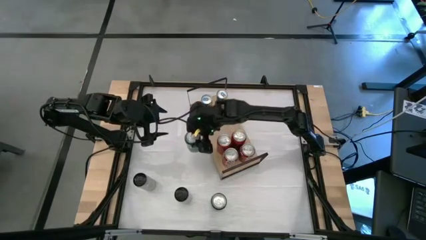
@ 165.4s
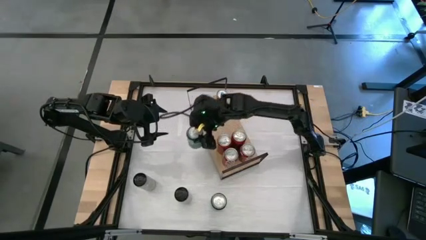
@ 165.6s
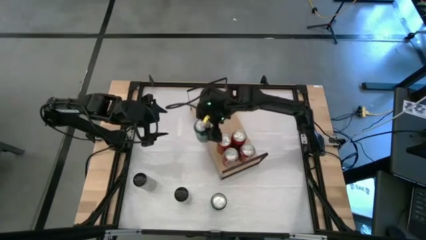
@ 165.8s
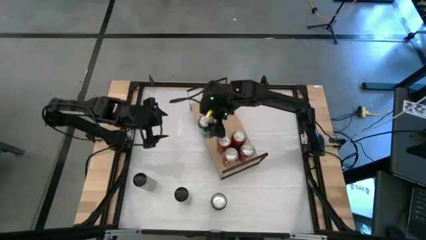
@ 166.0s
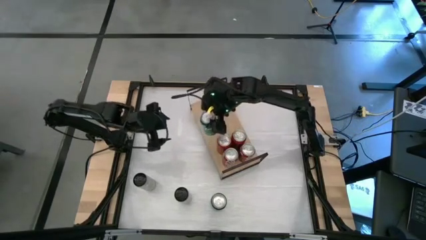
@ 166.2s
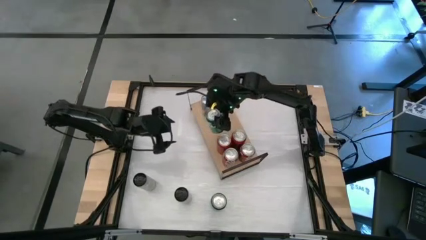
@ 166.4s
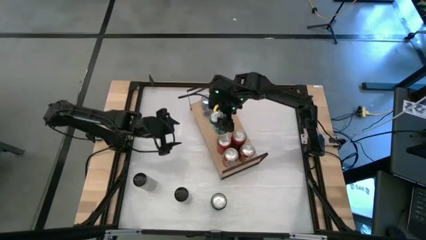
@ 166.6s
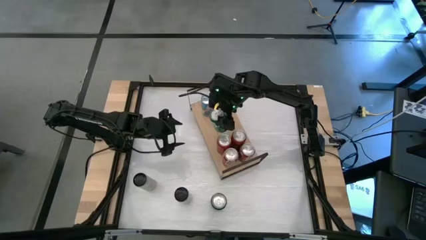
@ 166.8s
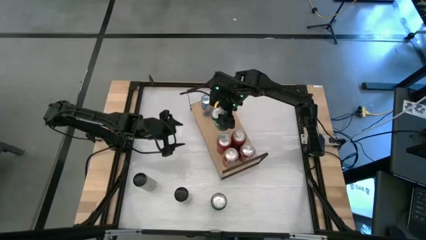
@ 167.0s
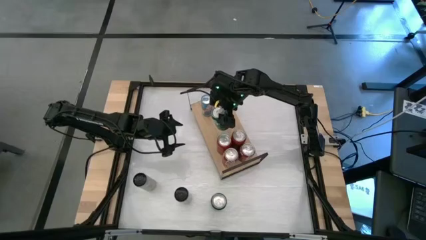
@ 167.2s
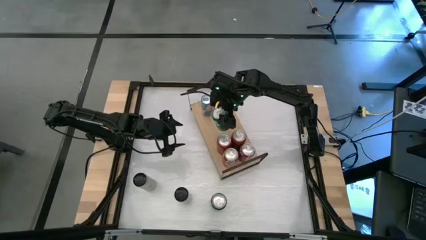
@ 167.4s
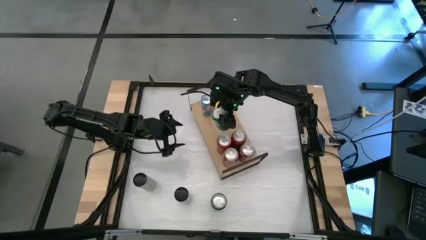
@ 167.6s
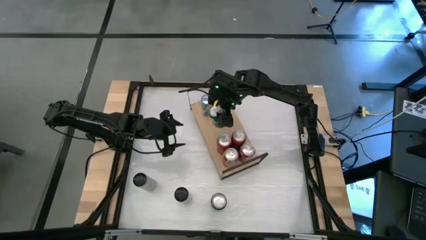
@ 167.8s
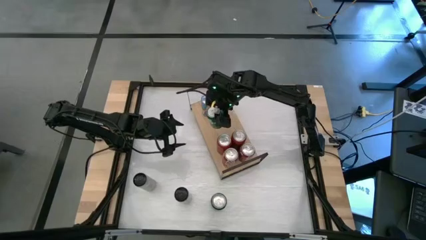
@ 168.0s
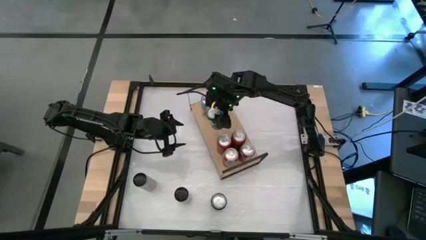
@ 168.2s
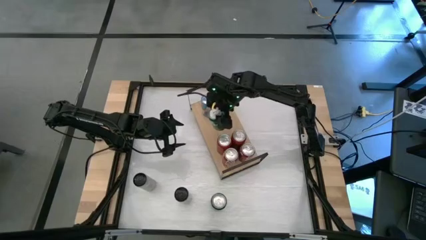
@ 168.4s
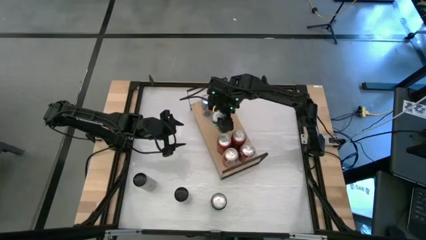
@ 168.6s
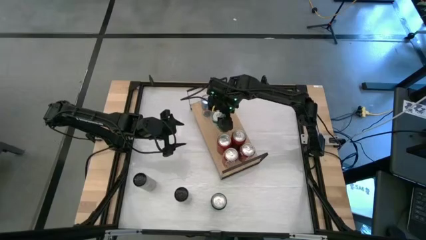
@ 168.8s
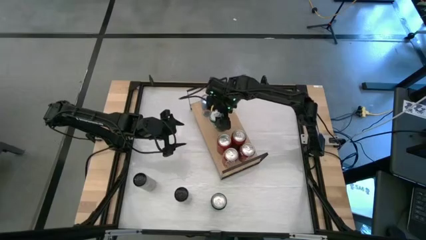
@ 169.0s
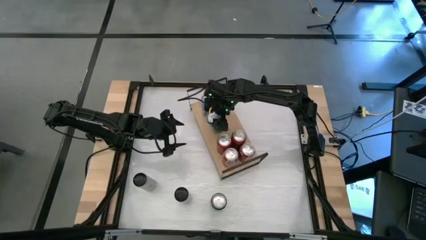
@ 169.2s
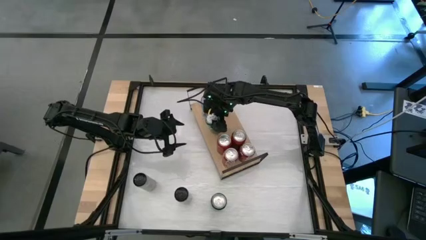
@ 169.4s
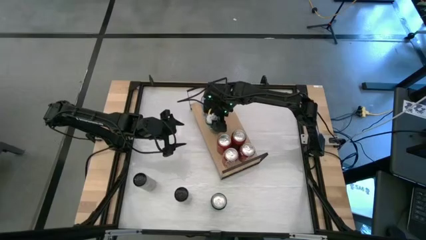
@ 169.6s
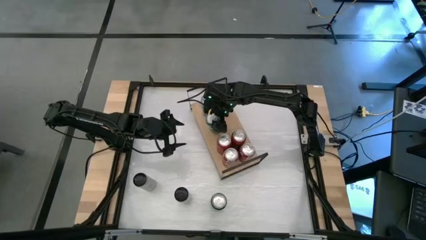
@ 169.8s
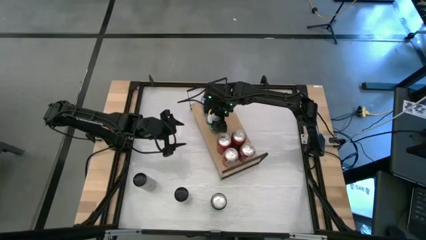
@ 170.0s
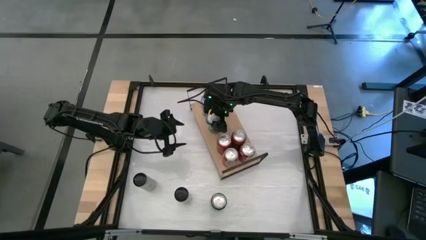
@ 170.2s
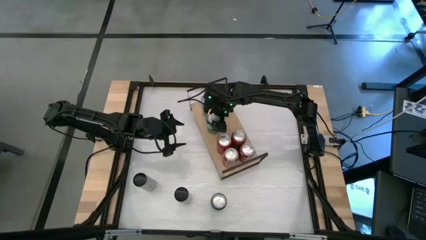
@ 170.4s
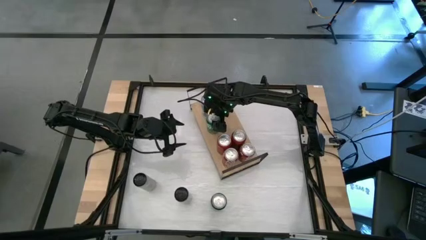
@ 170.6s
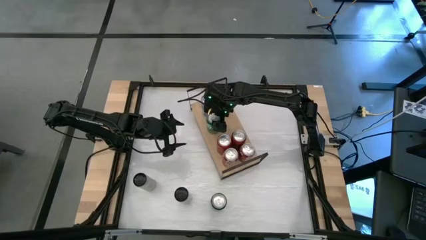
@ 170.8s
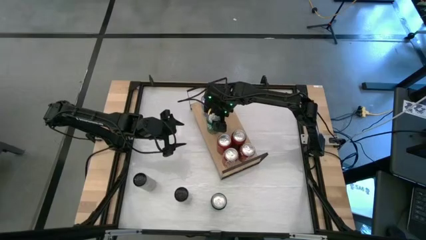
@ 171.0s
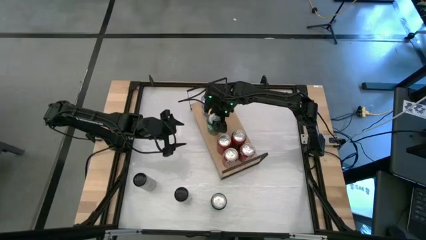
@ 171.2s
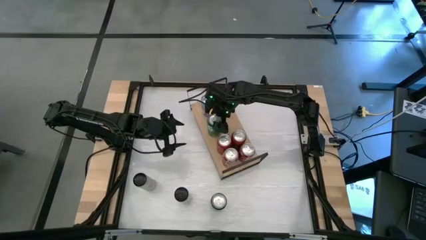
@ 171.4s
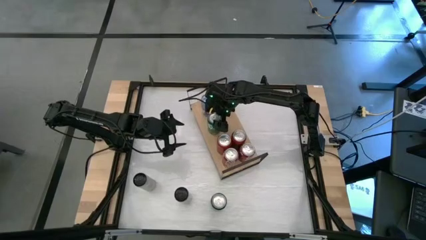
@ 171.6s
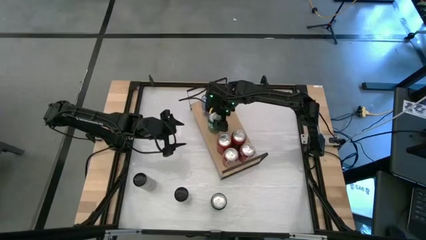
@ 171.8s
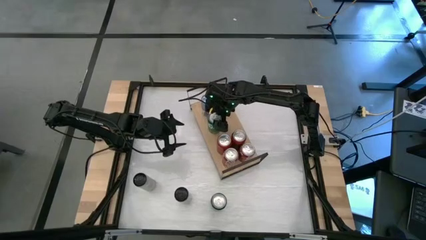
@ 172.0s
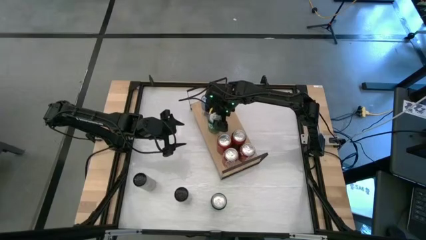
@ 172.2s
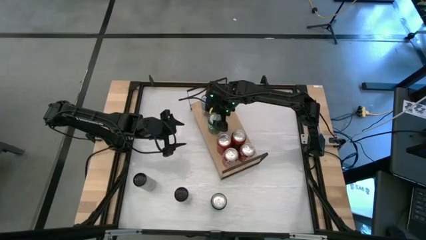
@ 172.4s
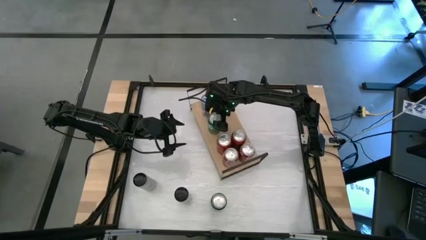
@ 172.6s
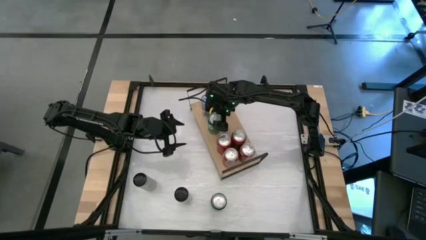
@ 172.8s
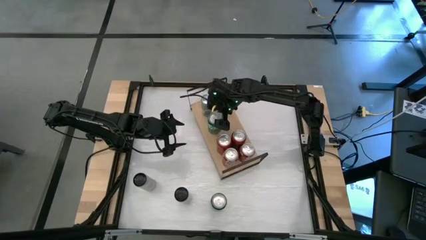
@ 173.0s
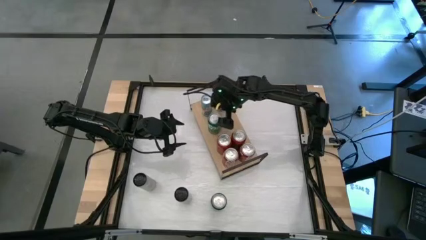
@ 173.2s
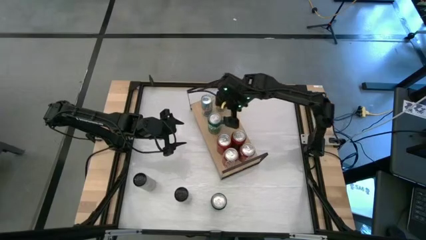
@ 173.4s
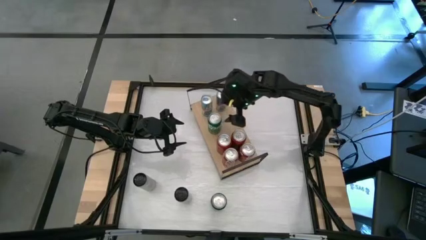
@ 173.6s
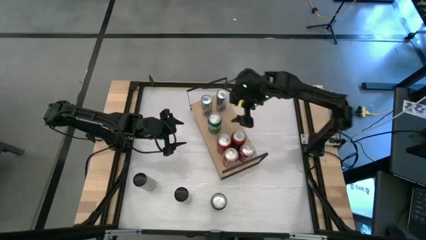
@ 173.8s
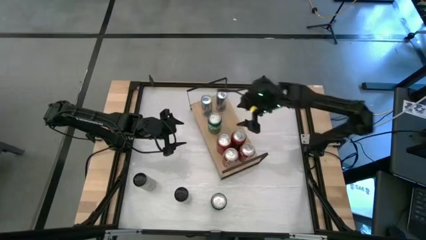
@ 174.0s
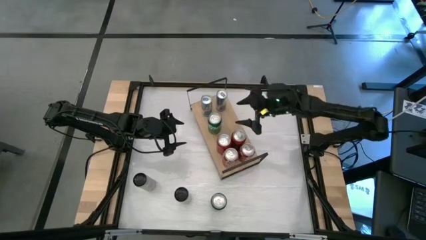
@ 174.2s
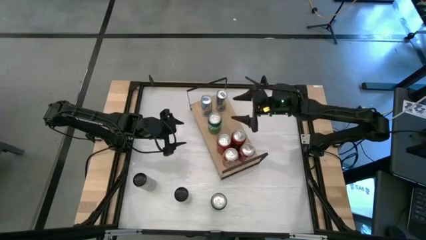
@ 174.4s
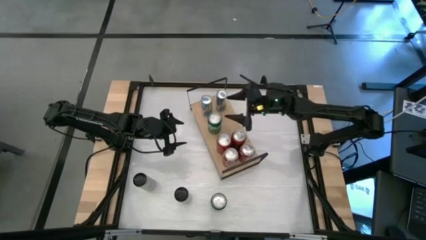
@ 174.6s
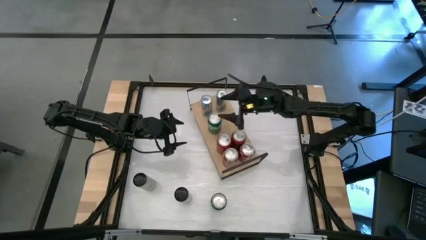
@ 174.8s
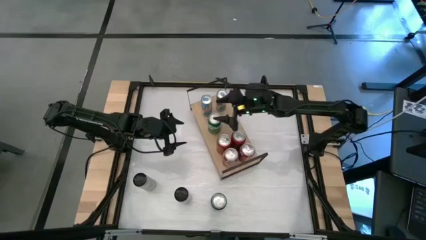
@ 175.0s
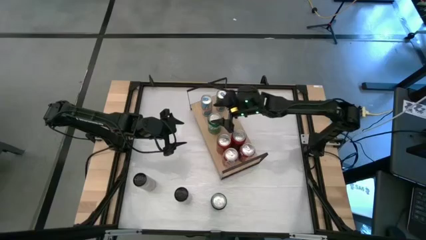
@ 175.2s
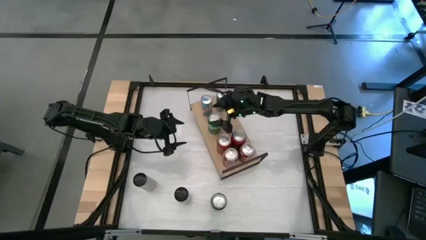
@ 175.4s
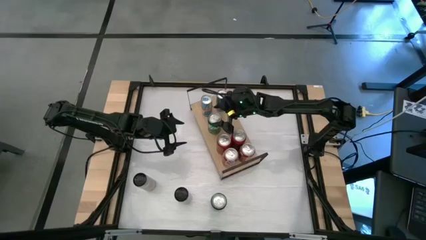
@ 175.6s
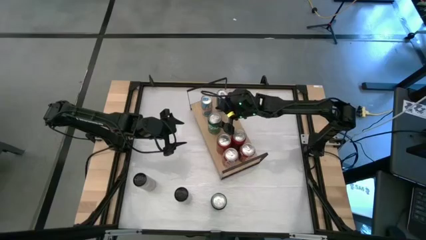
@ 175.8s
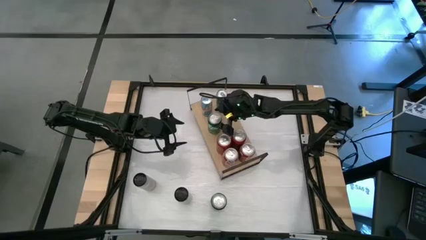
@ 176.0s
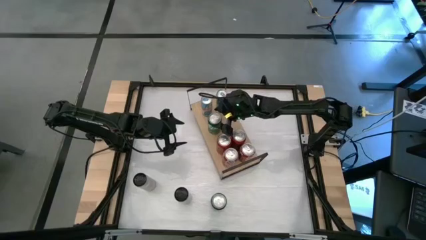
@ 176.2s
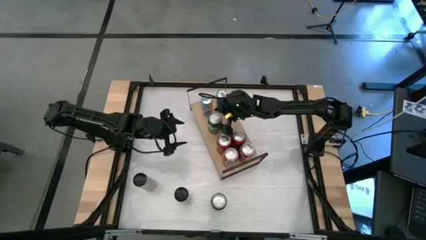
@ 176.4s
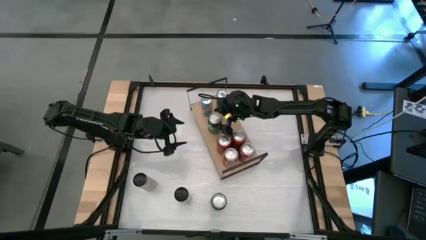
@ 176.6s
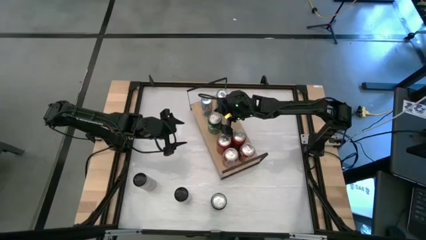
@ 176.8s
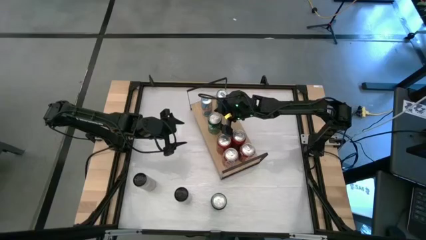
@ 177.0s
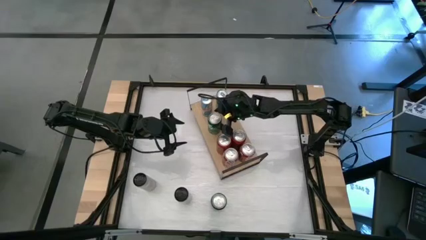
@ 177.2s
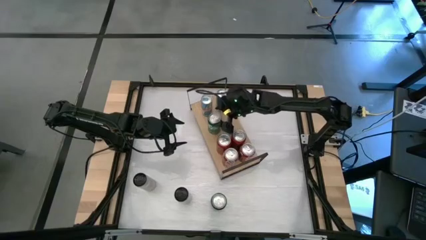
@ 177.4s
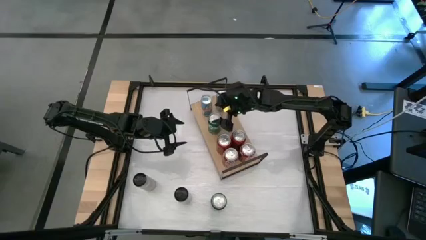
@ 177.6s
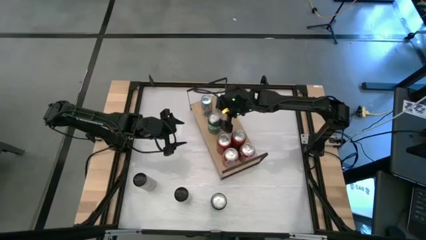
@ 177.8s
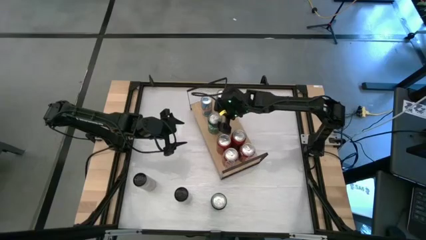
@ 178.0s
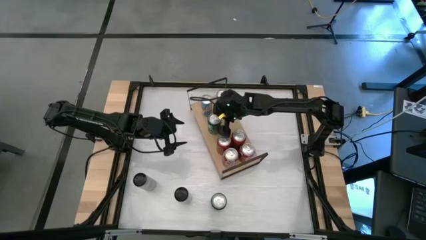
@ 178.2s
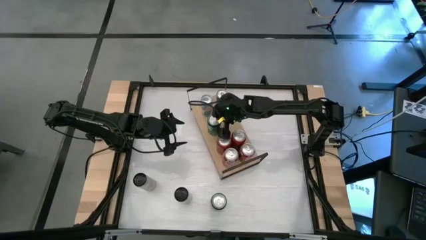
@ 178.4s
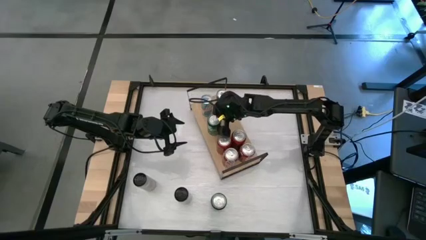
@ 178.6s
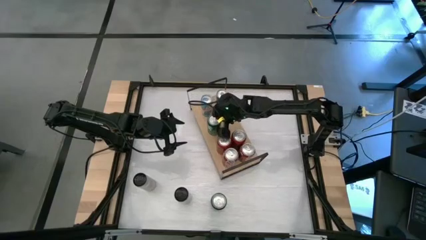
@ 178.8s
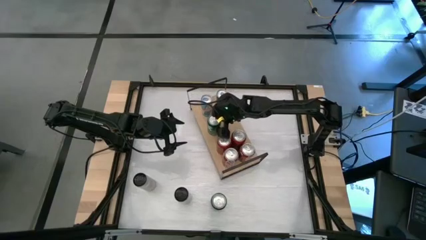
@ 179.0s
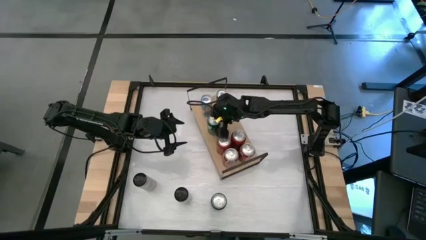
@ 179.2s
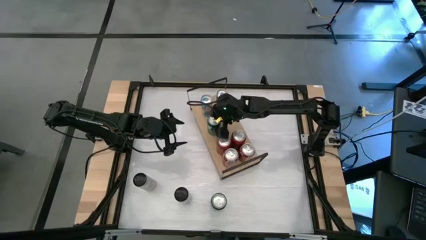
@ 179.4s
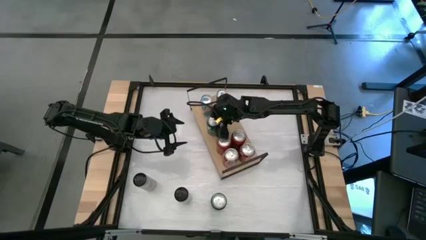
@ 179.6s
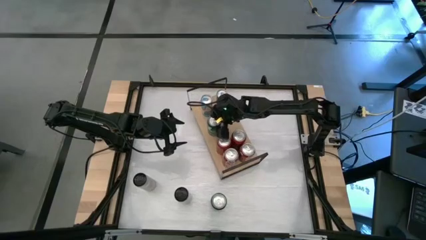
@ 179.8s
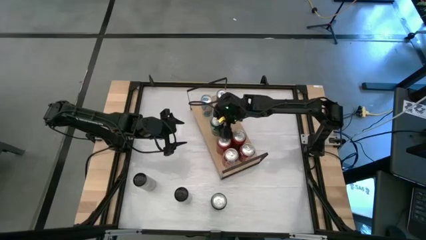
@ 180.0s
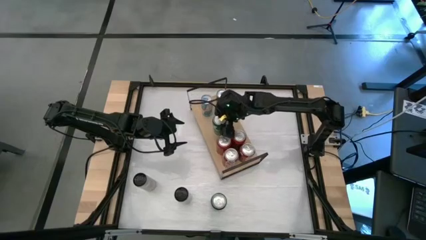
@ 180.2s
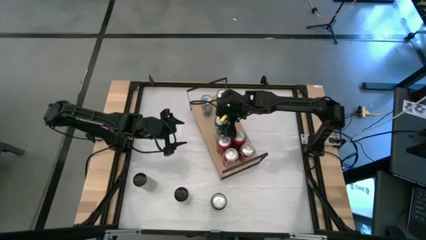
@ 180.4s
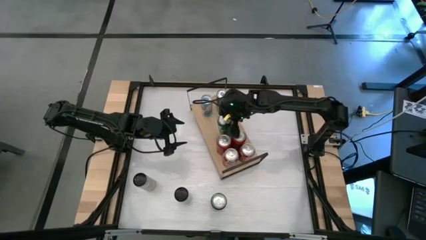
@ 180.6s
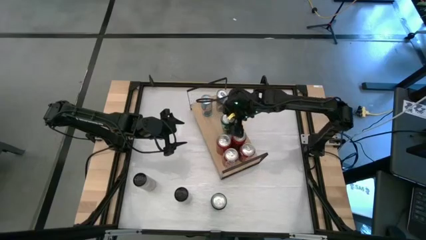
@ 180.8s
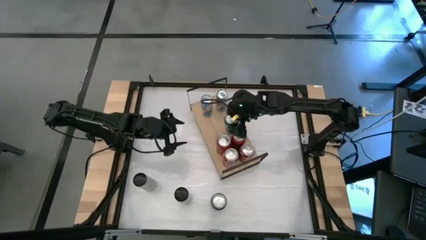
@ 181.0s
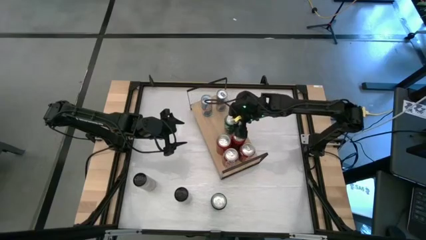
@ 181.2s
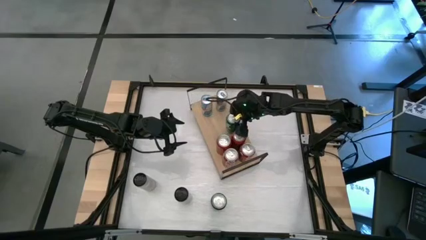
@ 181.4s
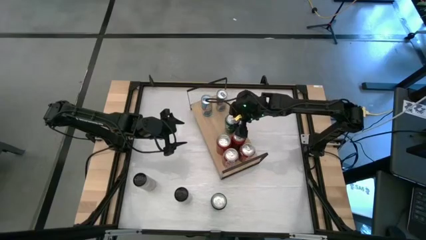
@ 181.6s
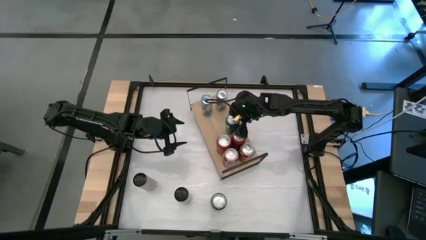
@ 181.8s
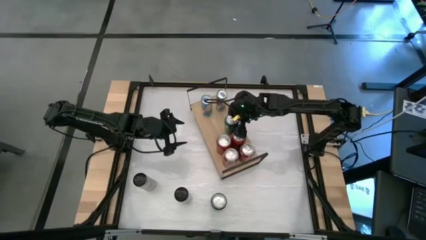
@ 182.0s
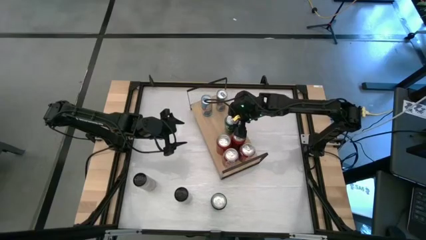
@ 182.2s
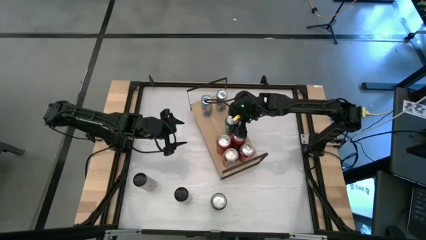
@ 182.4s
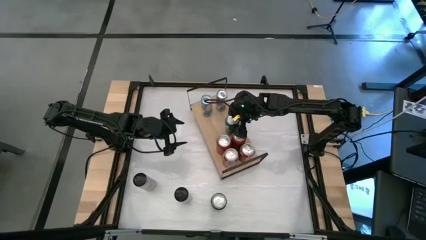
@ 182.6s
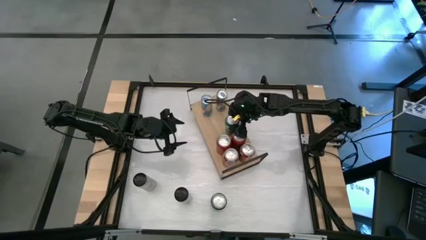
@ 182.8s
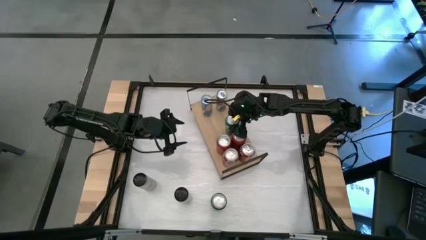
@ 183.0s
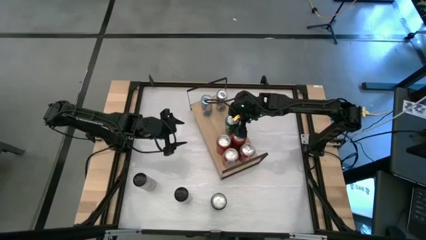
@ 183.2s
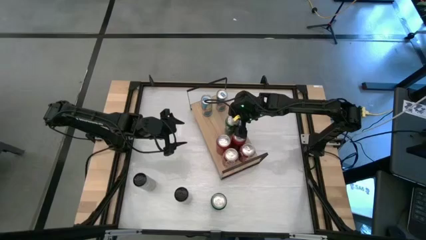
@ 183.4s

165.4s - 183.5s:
Task: Place canned beverage on shelf
Put the left green soda can on the shelf
